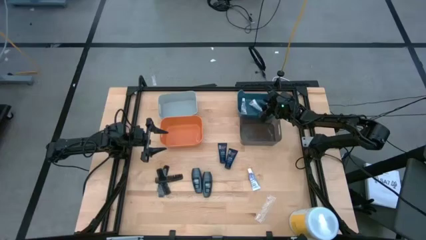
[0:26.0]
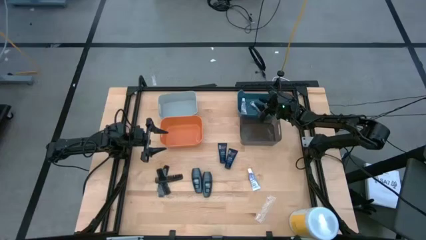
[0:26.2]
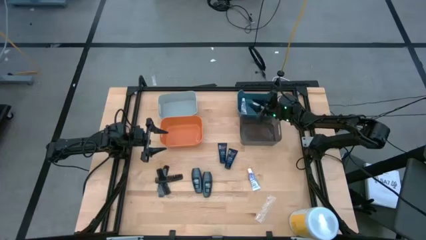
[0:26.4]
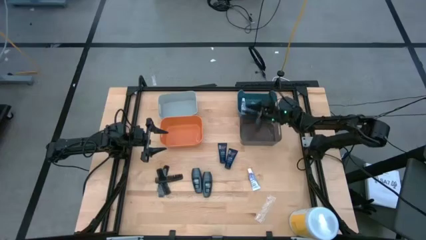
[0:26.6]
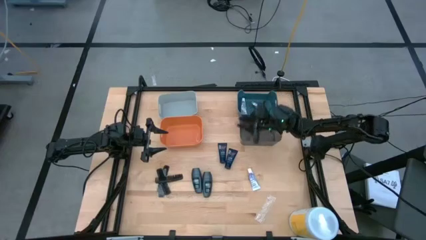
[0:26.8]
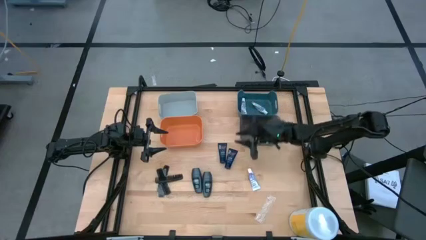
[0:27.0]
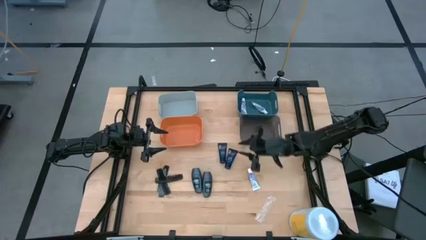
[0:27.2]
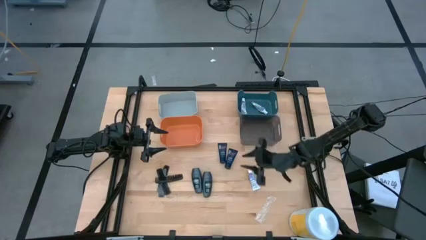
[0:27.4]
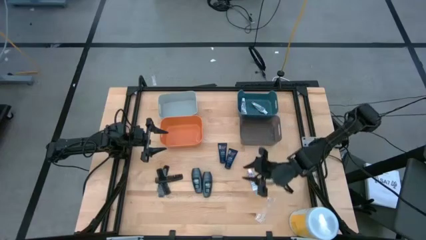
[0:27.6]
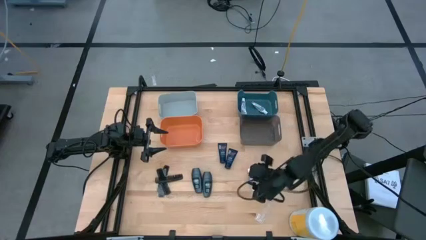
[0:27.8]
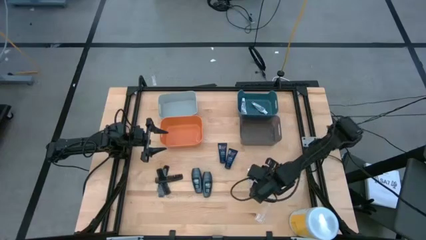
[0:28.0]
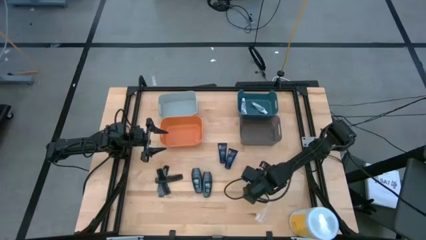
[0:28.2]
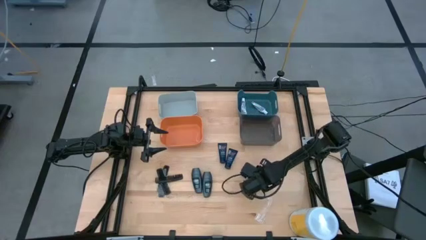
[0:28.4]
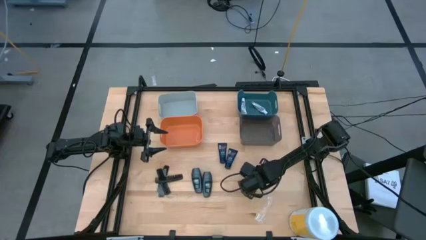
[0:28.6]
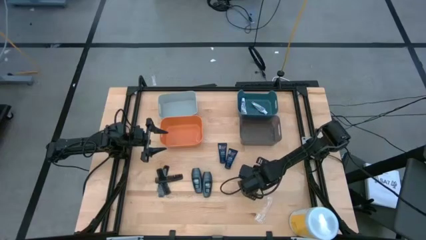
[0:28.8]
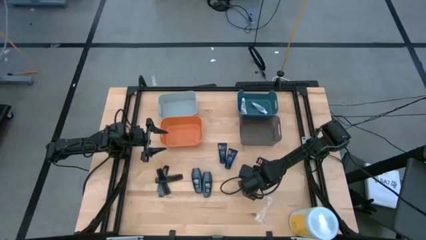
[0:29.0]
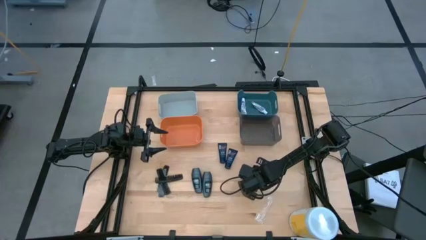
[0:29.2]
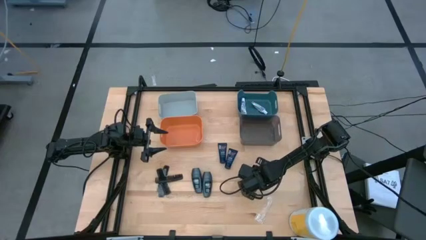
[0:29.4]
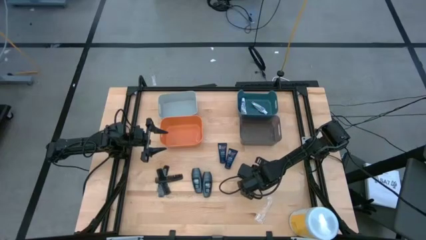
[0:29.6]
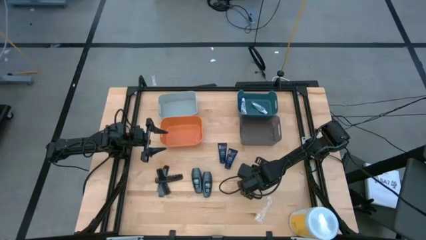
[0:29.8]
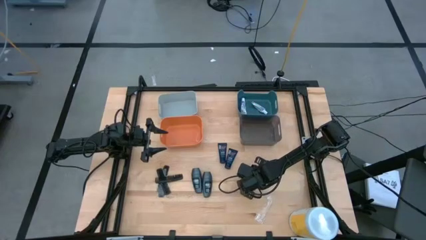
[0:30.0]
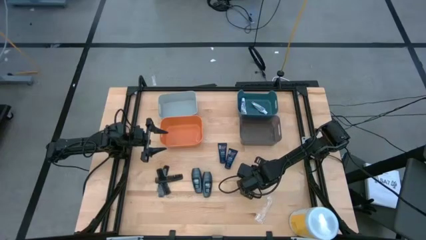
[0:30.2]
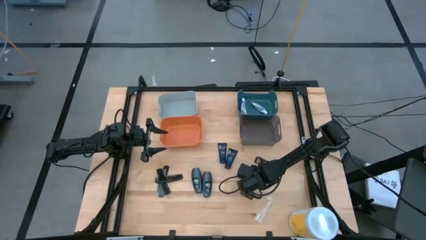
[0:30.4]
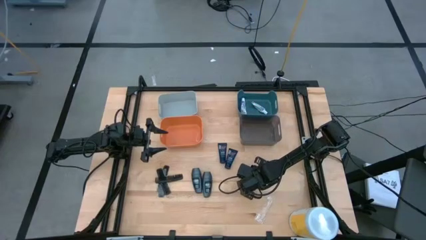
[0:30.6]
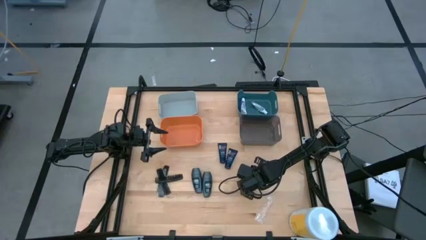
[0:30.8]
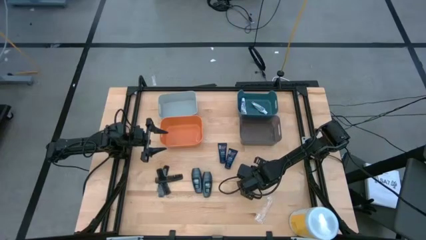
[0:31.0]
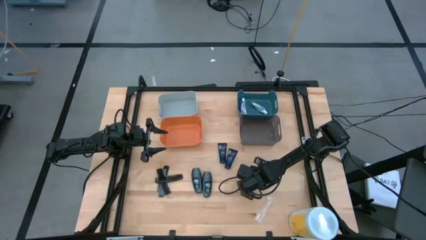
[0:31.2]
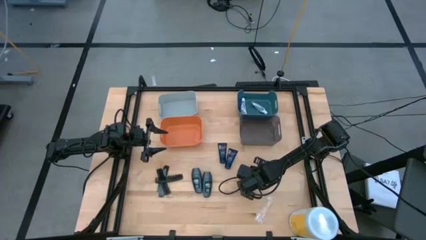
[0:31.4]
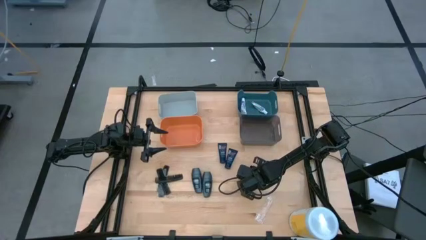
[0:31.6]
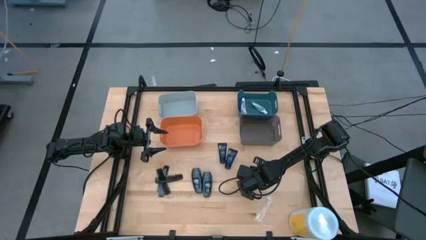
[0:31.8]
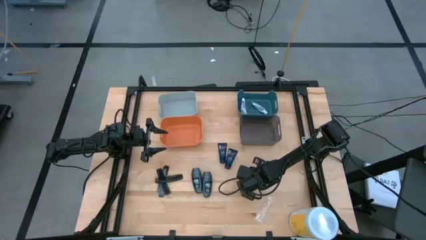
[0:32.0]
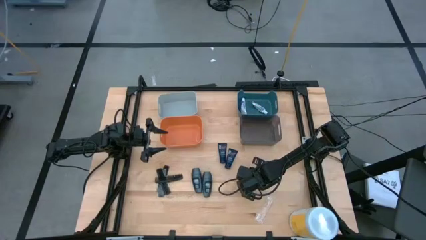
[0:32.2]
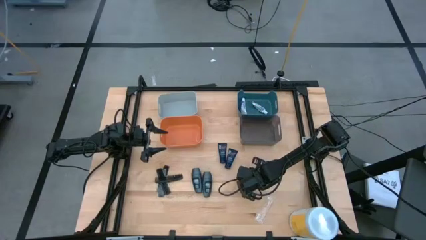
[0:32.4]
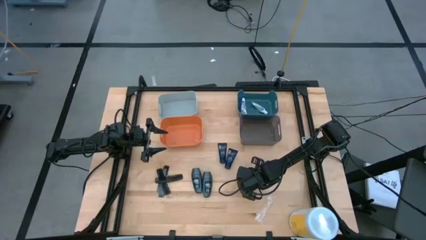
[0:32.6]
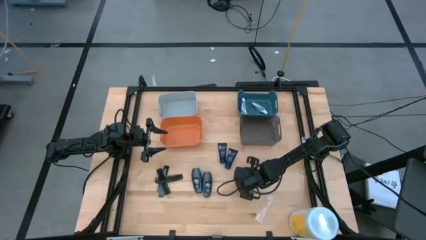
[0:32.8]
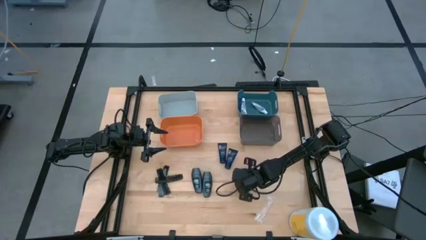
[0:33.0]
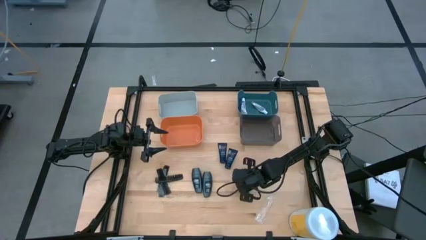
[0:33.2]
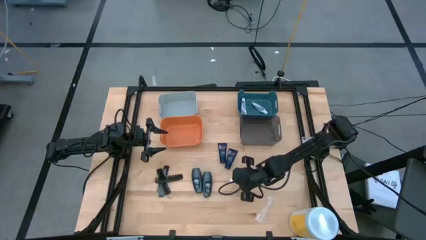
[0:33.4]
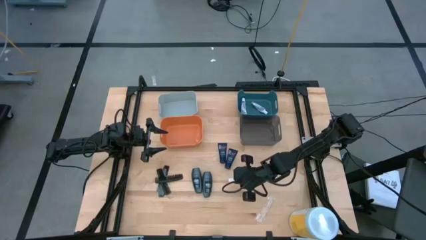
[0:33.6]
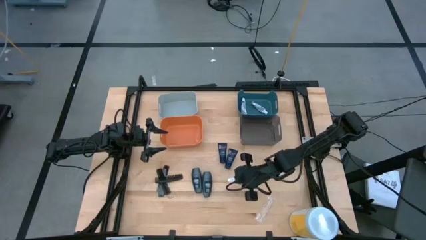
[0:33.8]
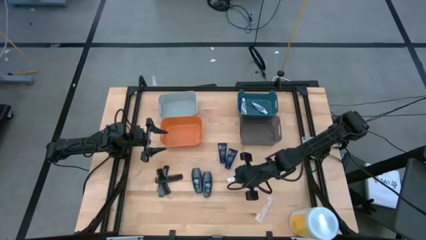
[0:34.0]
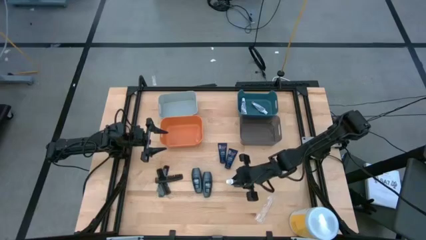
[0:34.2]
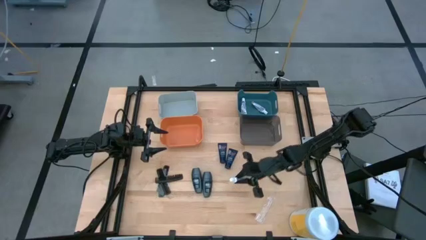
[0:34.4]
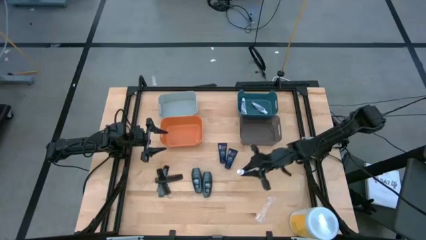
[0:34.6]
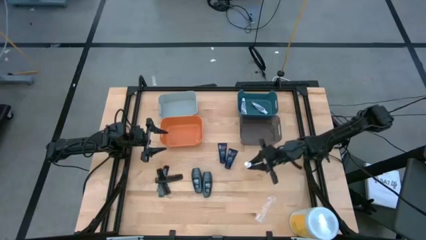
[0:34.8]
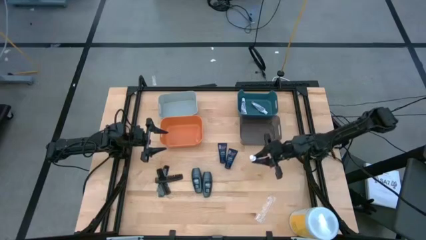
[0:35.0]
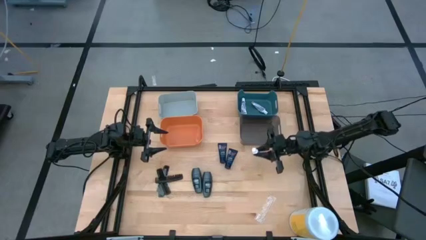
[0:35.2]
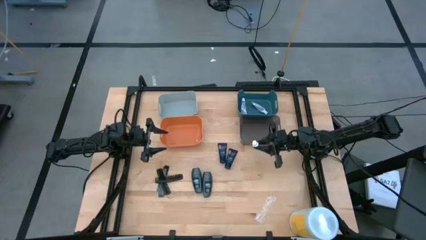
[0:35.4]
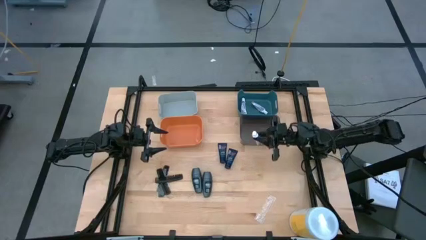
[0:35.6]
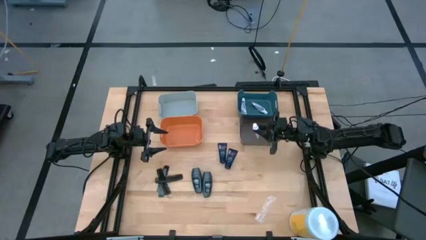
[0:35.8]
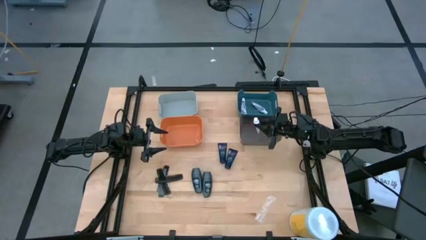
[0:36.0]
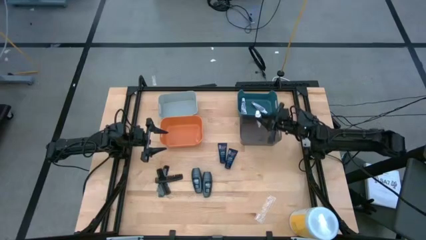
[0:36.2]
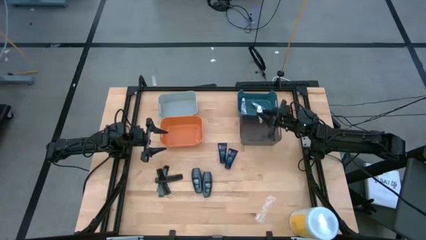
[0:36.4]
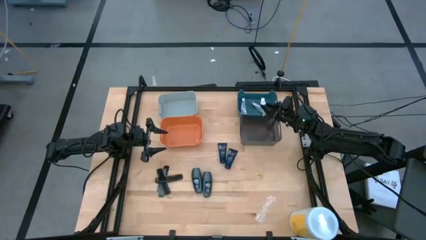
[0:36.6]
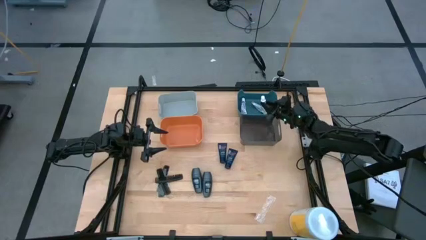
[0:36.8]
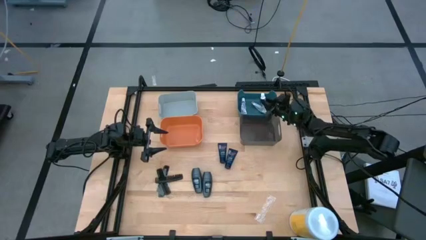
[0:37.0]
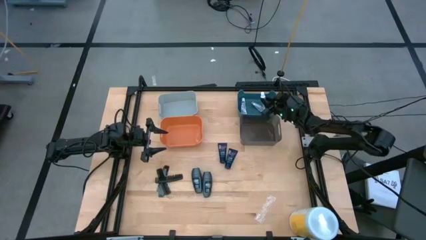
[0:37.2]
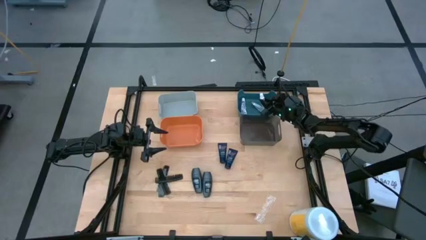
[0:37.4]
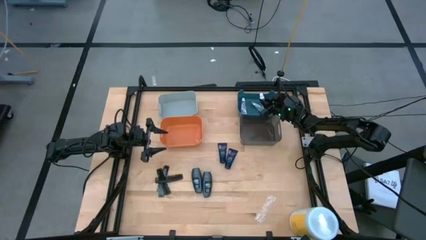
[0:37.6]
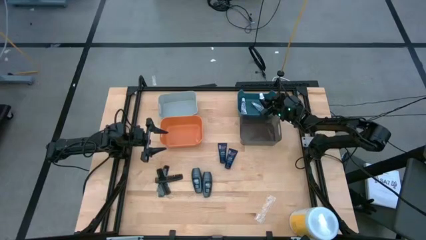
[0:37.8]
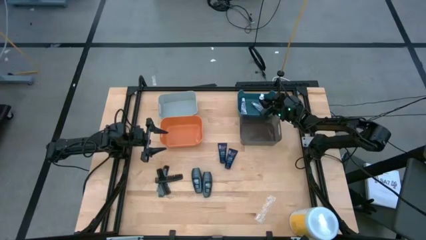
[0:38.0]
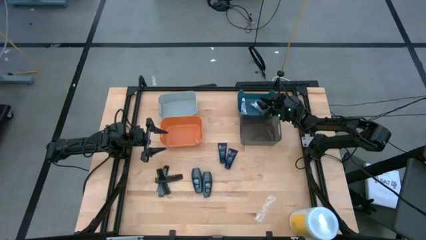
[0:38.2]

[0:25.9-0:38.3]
Task: Pick & Place Travel size toiletries
Put the white toothpaste into the blue bin

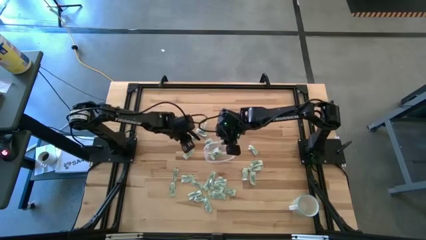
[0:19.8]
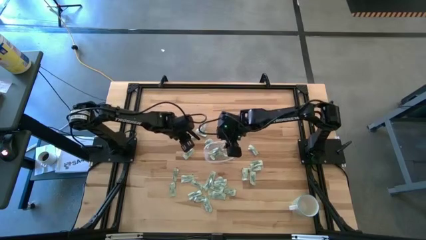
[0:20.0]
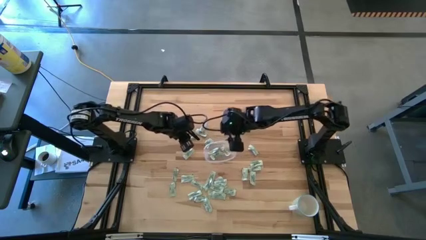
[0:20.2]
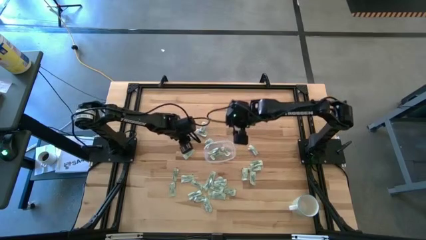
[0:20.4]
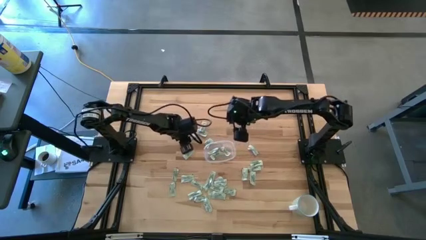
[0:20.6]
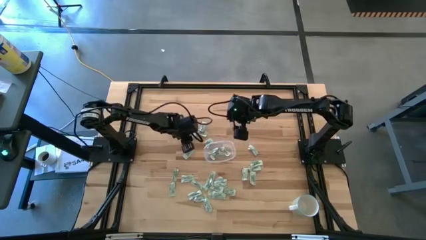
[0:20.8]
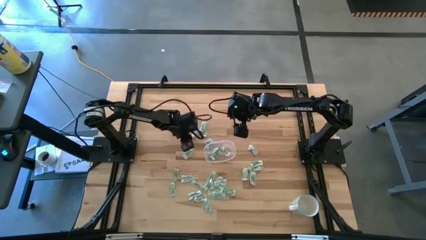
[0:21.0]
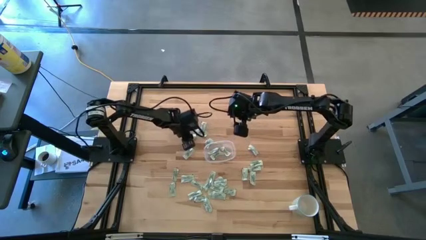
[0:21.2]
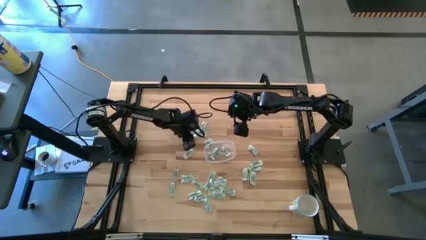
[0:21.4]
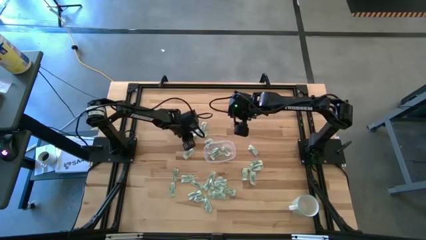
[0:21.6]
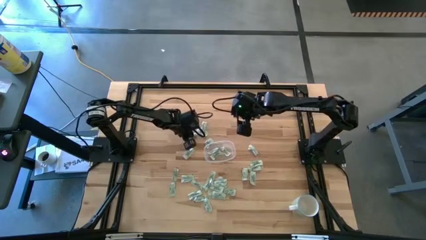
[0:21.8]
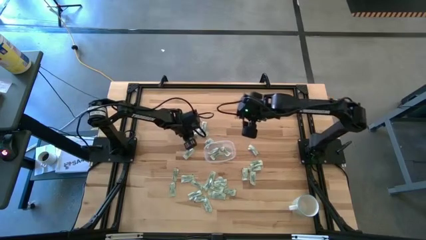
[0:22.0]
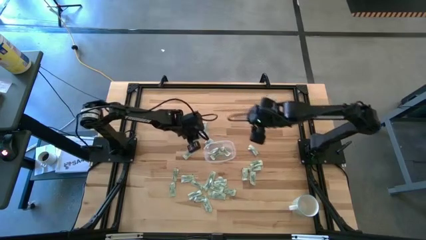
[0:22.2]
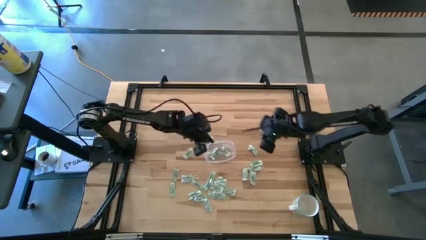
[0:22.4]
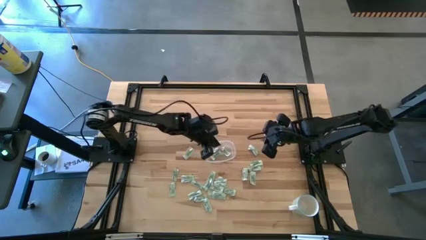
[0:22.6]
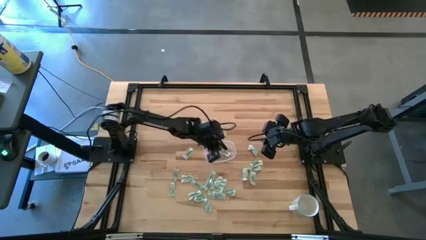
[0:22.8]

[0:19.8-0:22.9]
Task: Pick and place Stevia / Truvia into bins
Put the stevia packet into the transparent container

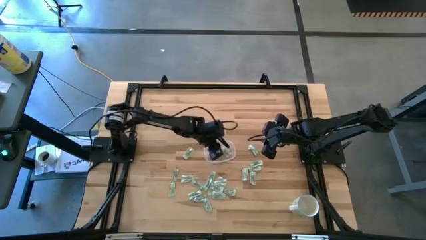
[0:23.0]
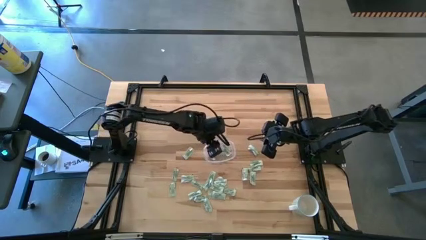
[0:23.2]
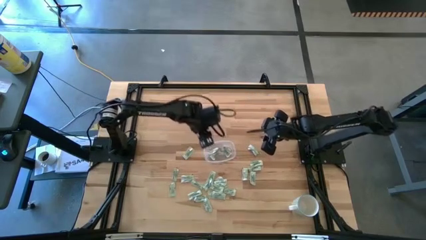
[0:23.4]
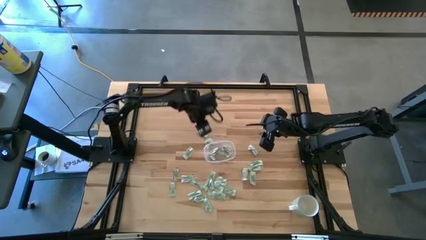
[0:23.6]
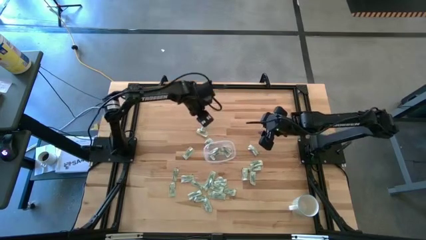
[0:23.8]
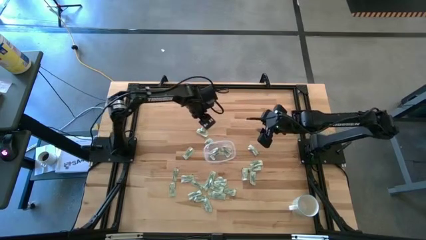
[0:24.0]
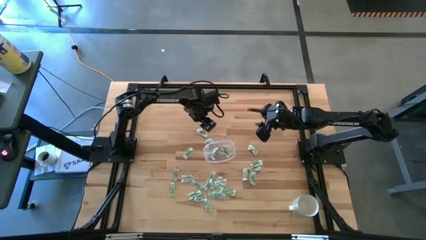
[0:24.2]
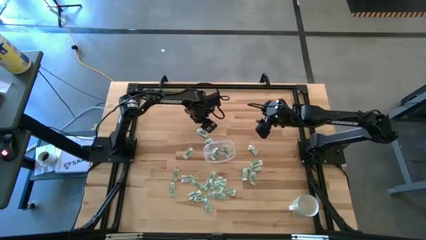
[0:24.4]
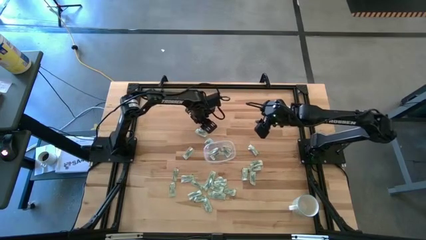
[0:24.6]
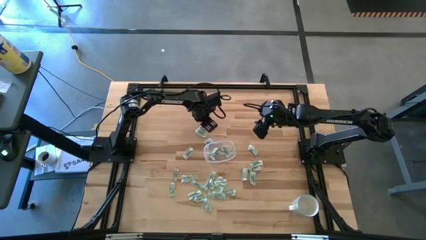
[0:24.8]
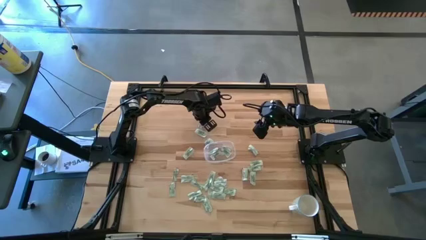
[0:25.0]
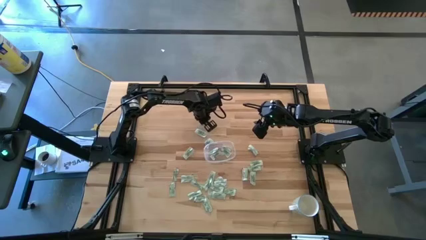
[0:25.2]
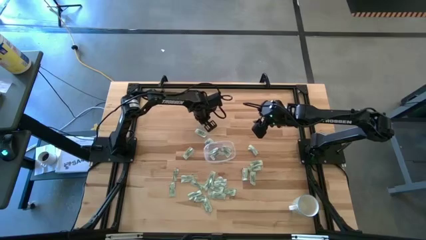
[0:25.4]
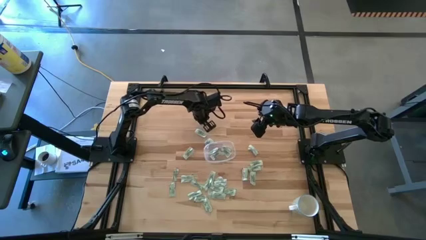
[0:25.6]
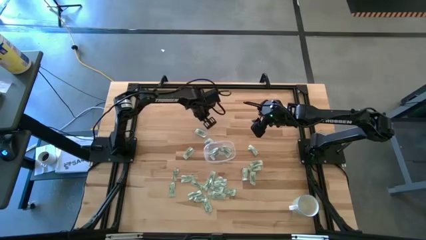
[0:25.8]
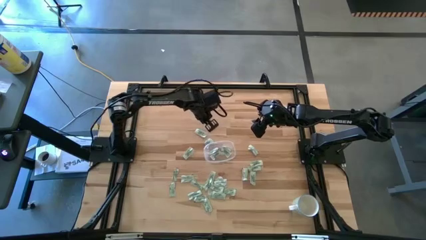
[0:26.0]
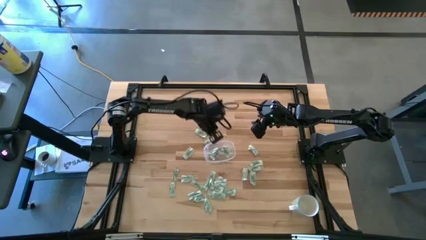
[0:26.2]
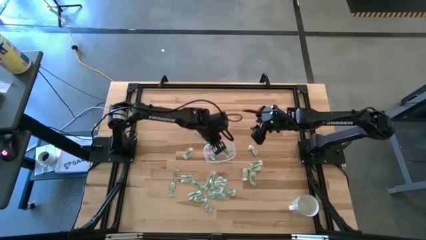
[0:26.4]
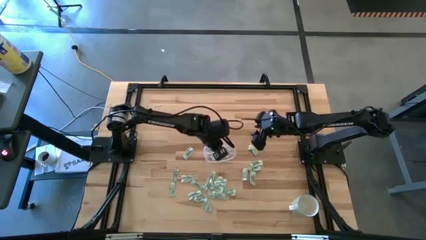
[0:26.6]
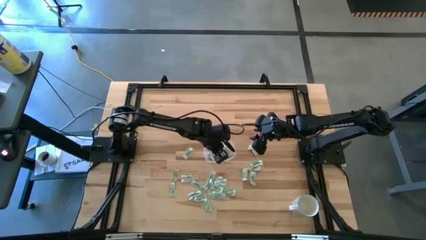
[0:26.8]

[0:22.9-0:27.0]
Put the stevia packet into the transparent container
